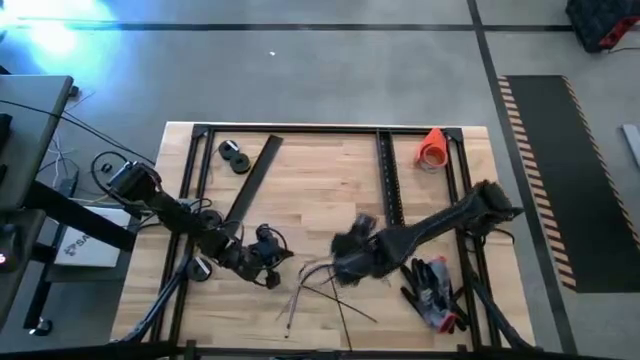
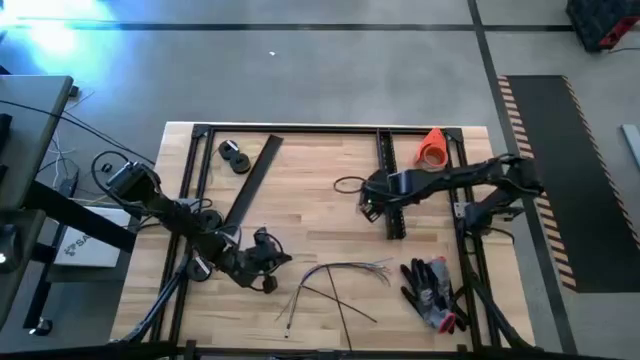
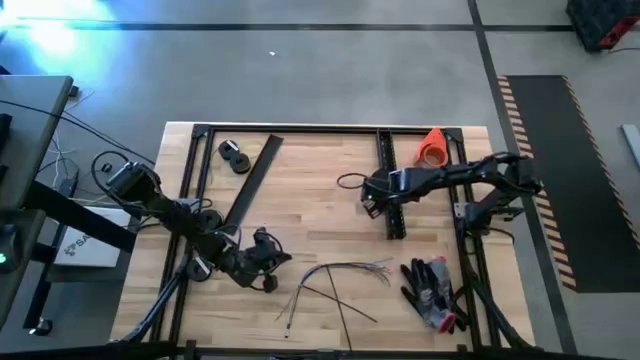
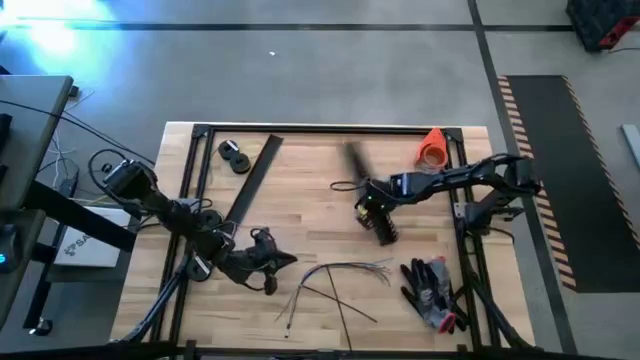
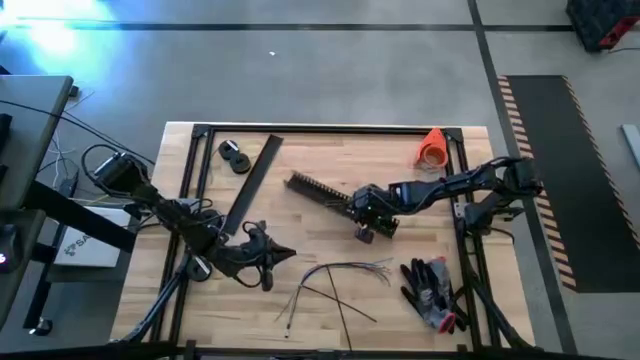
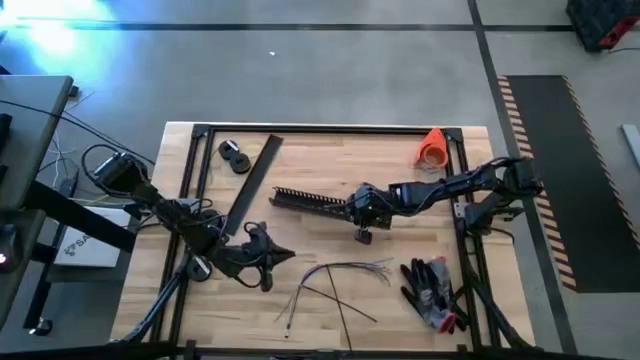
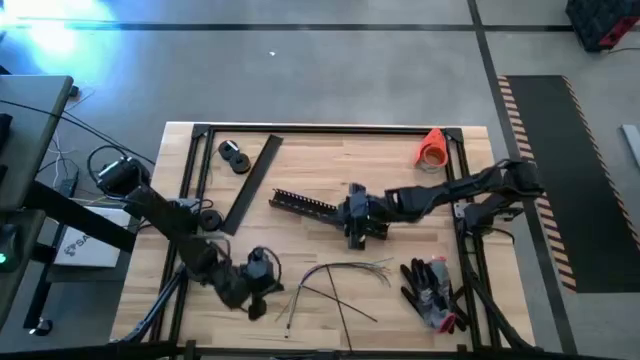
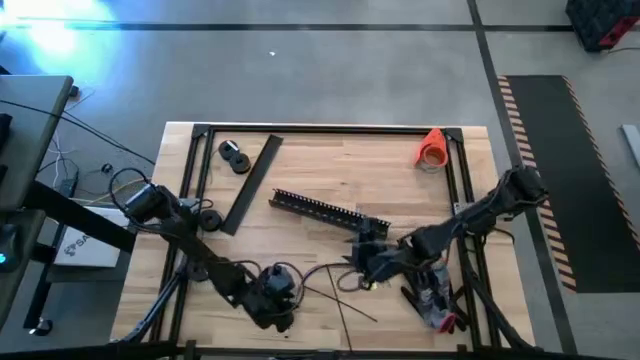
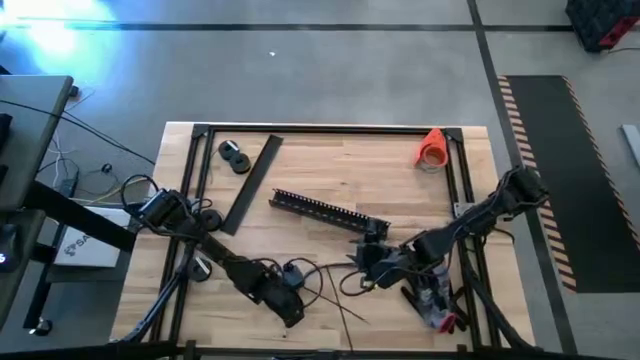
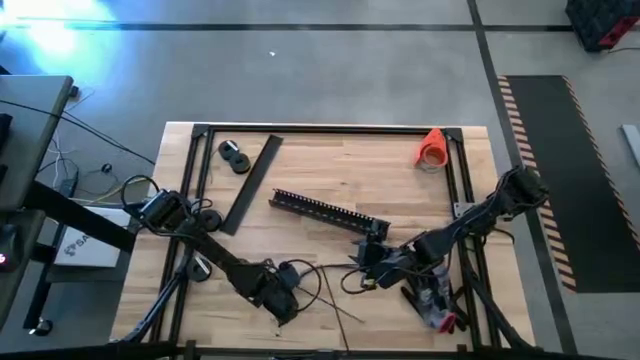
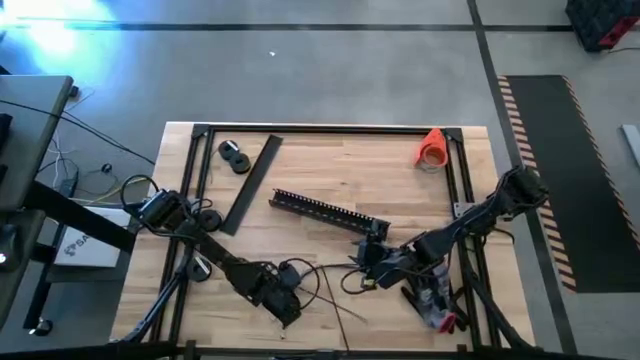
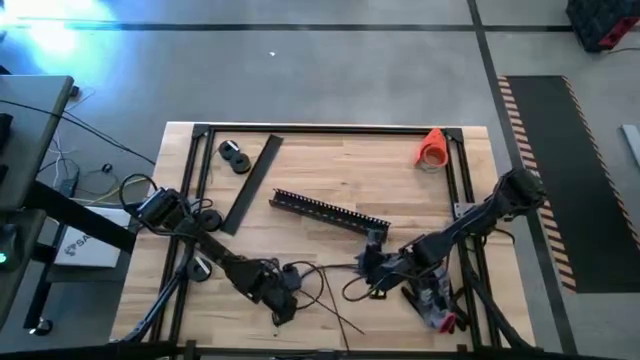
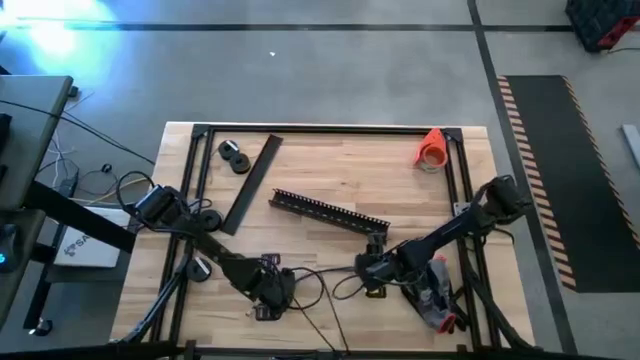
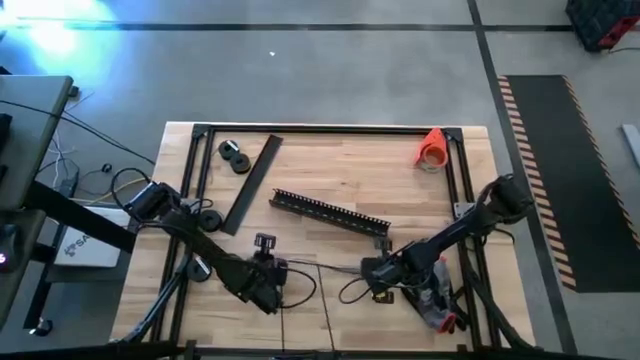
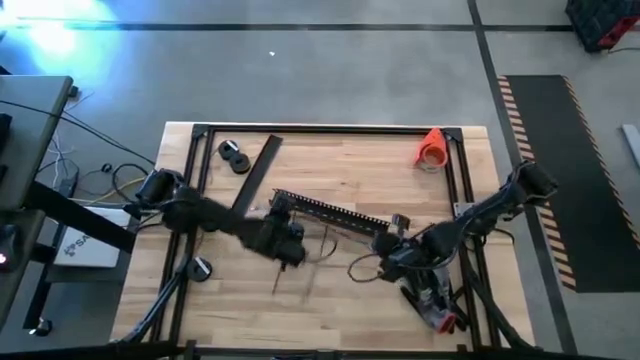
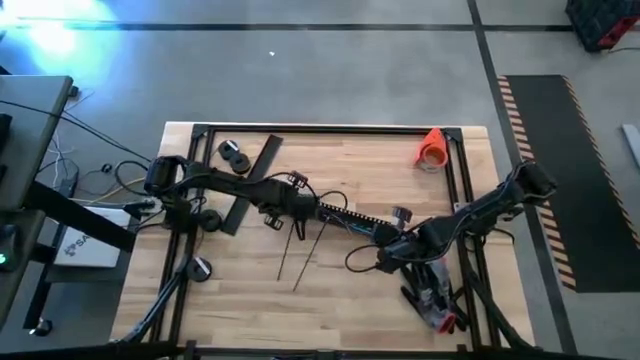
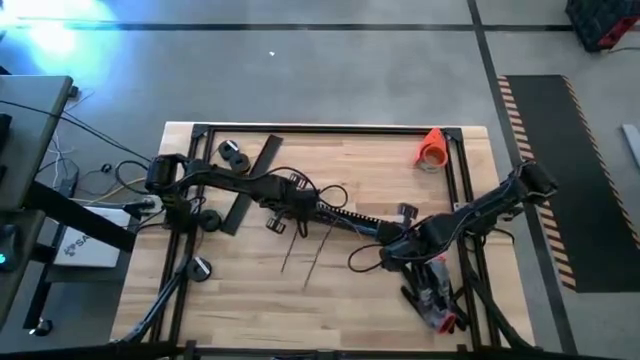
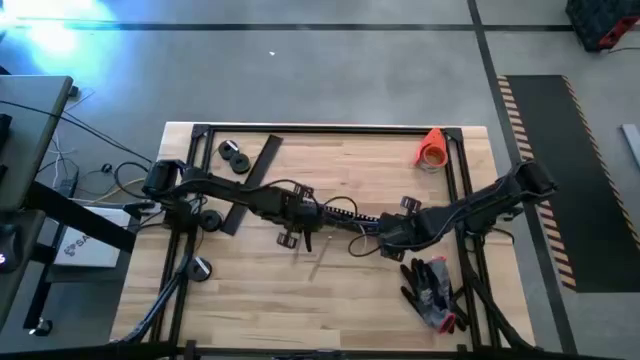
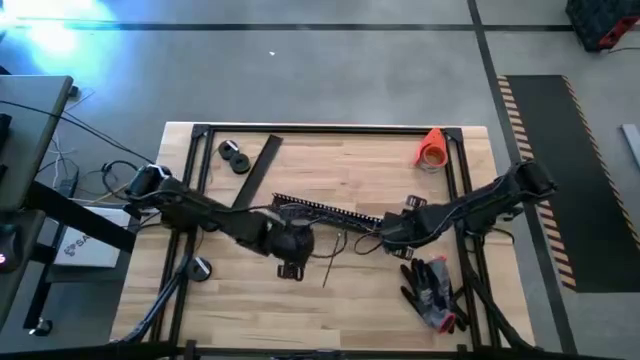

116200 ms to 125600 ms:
Task: Ziptie cables
Insert the zip tied cables into the black cable duct

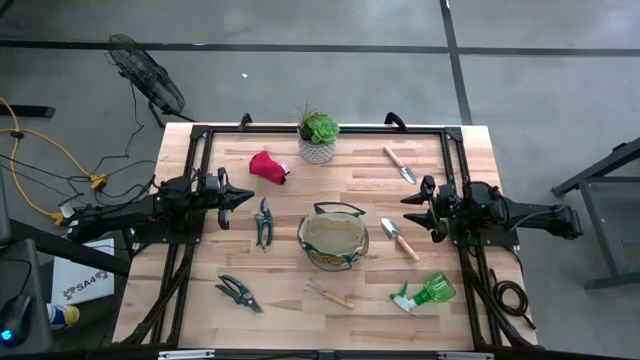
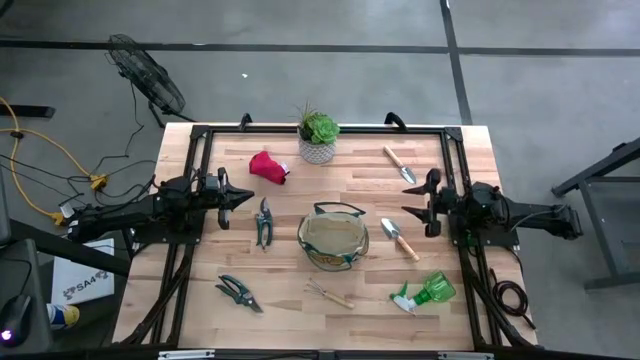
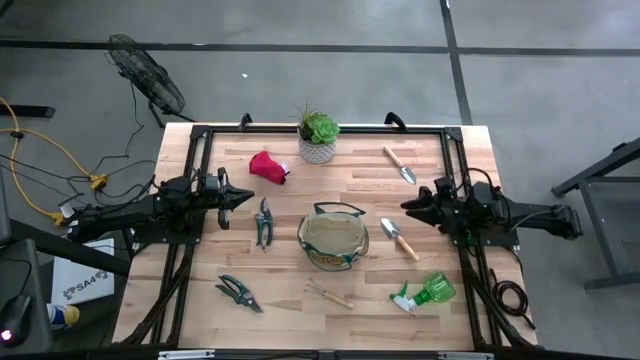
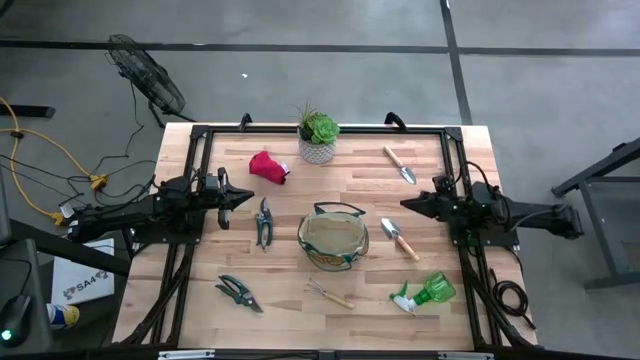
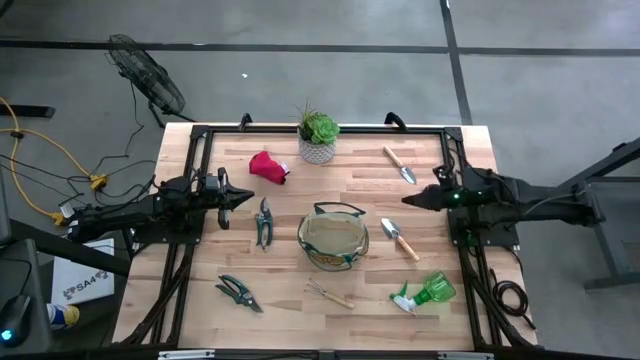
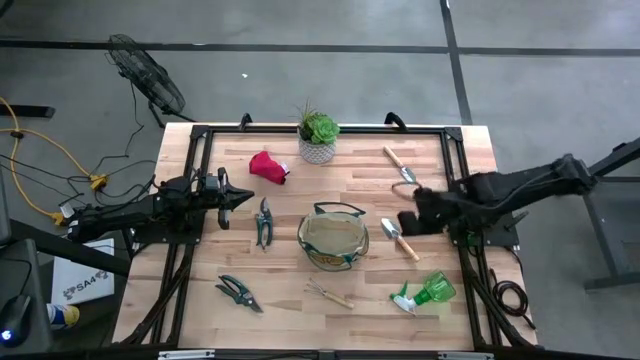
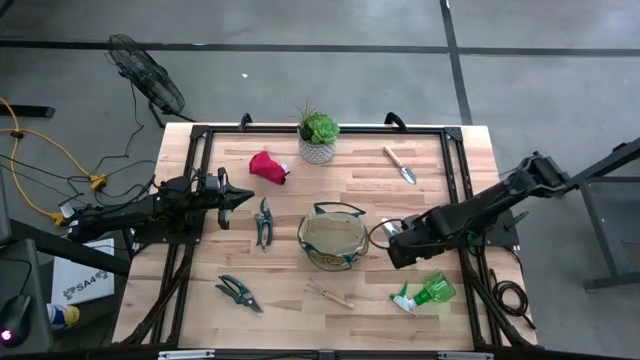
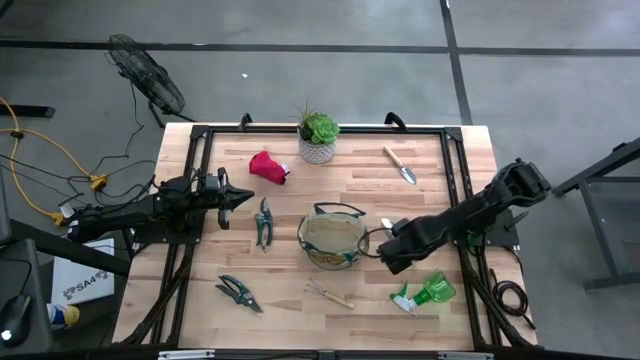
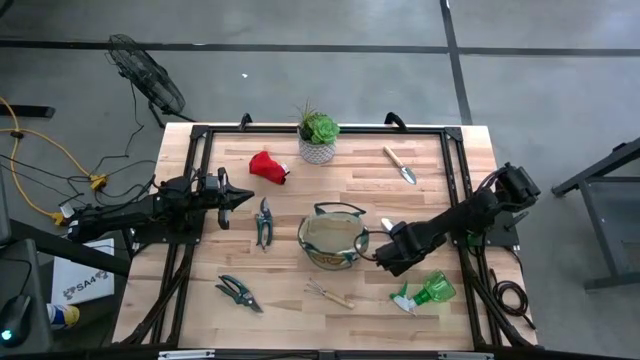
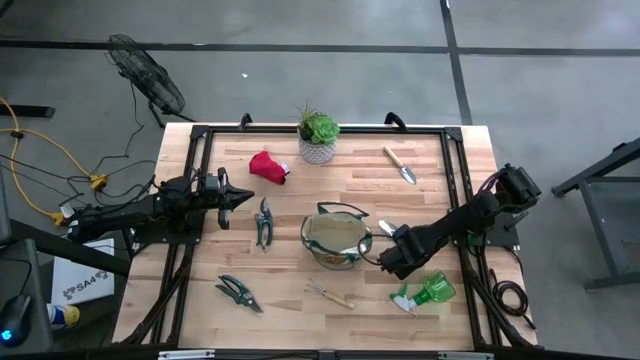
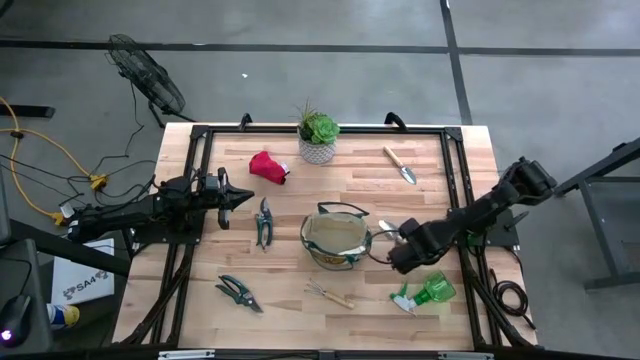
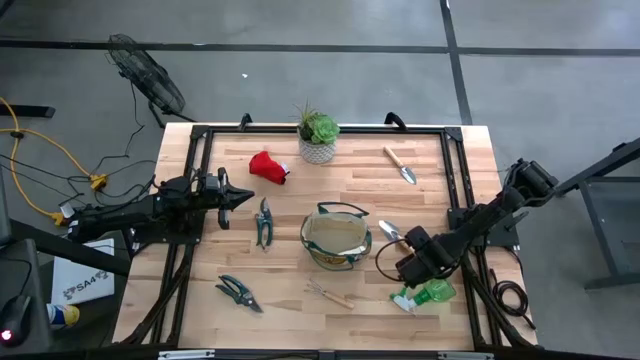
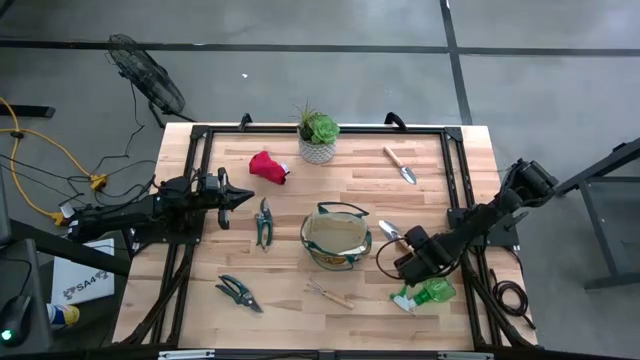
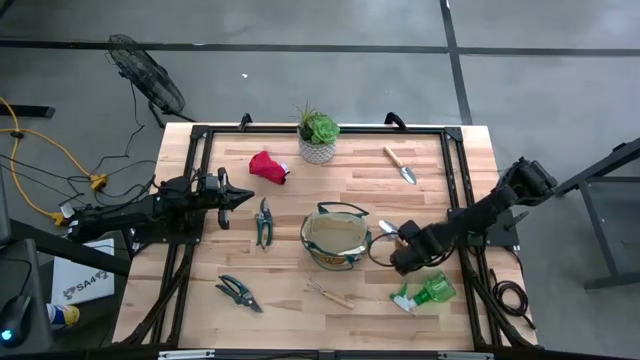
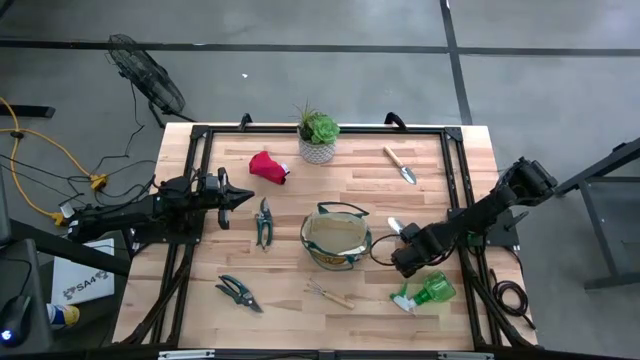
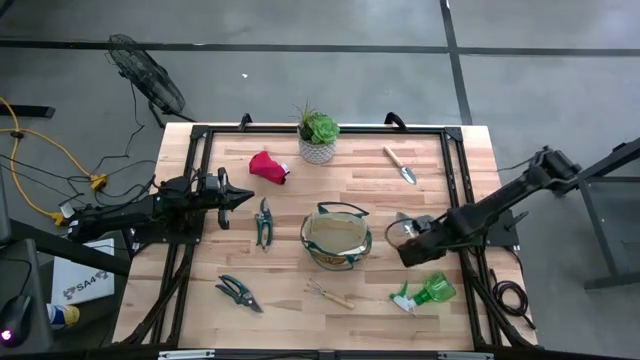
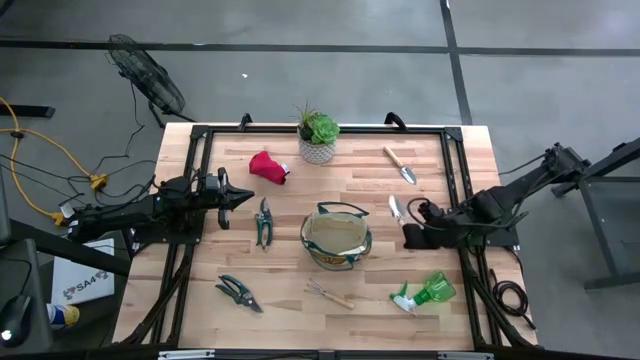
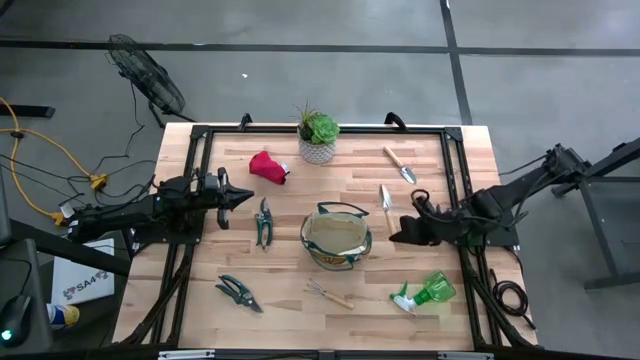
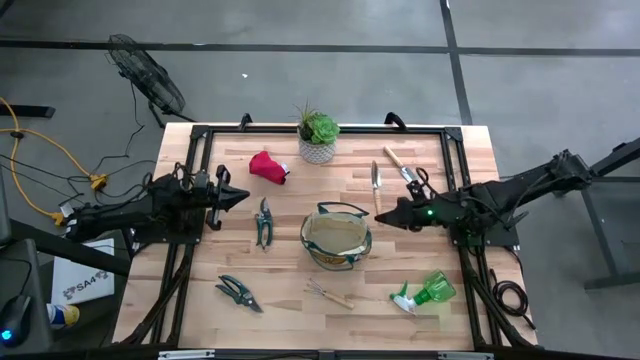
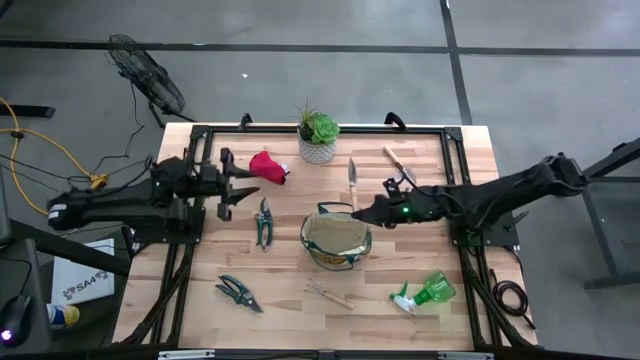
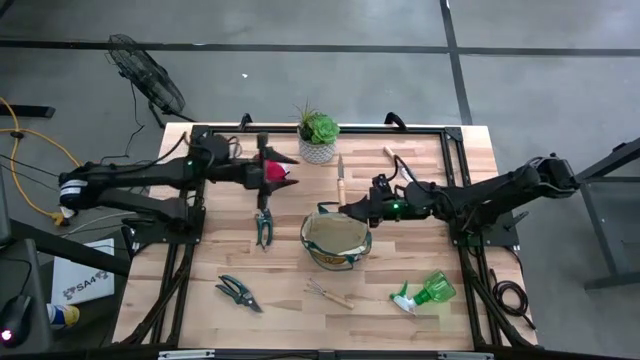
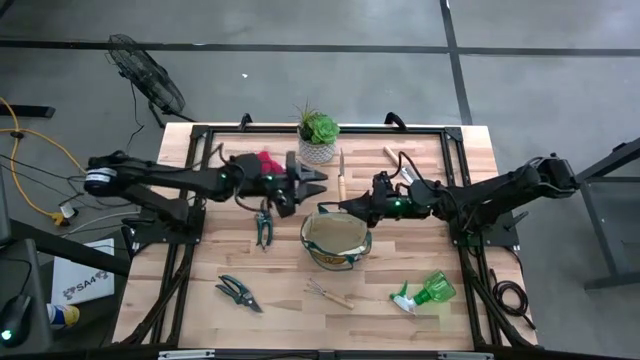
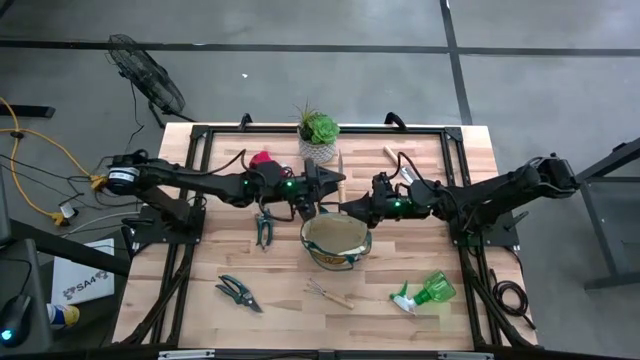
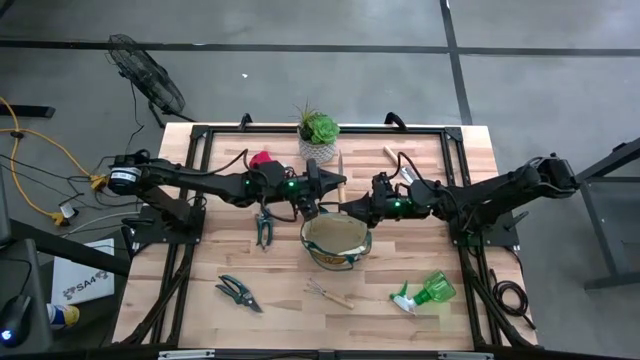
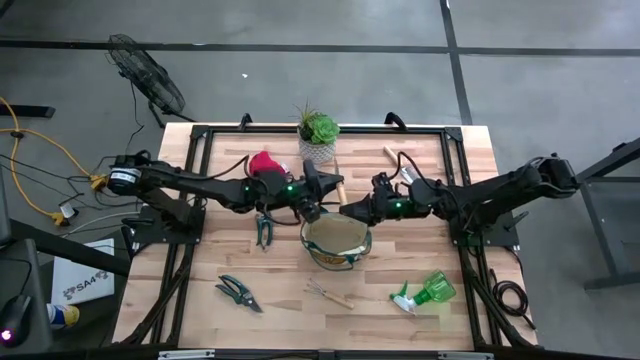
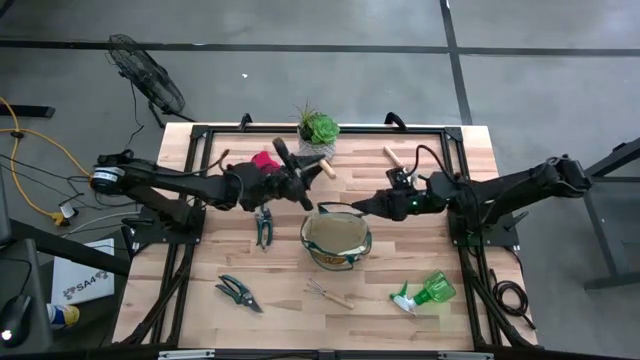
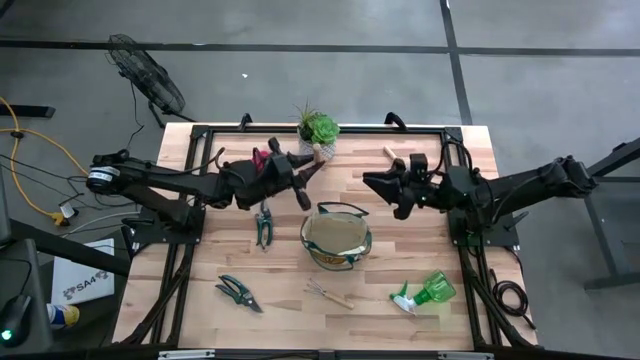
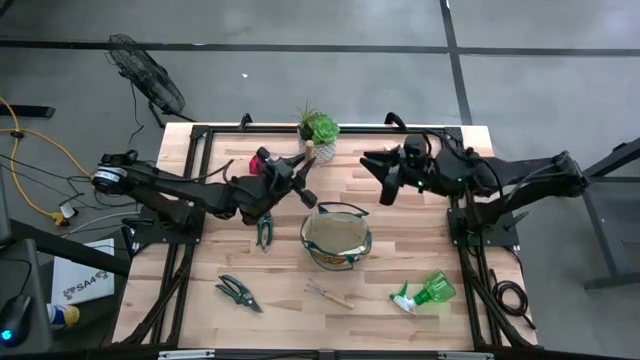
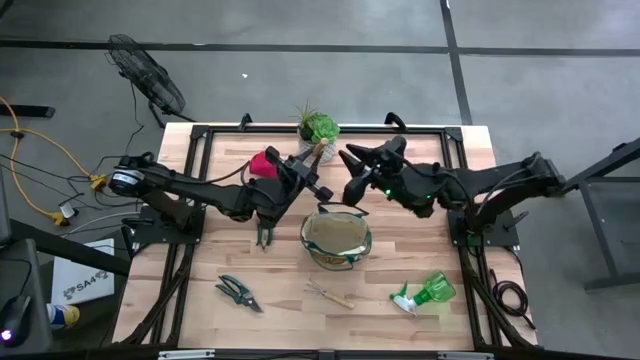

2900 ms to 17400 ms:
Task: Pick & Place Garden tools in Gardening bag
Put the bottom brown trowel into the gardening bag
